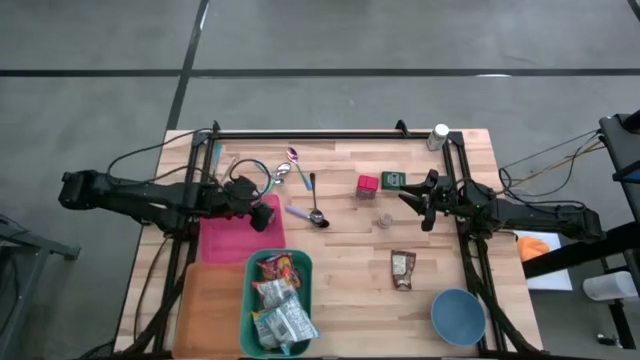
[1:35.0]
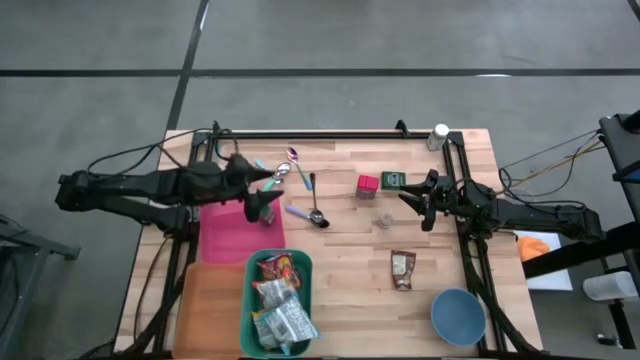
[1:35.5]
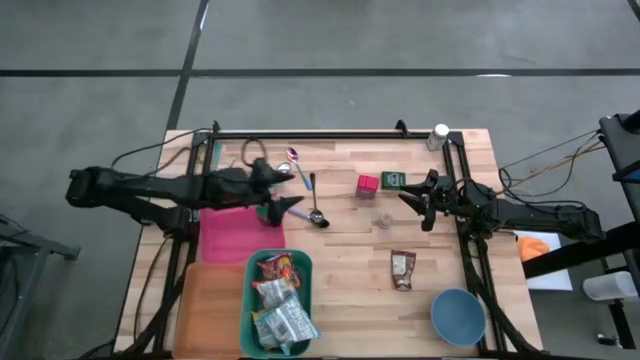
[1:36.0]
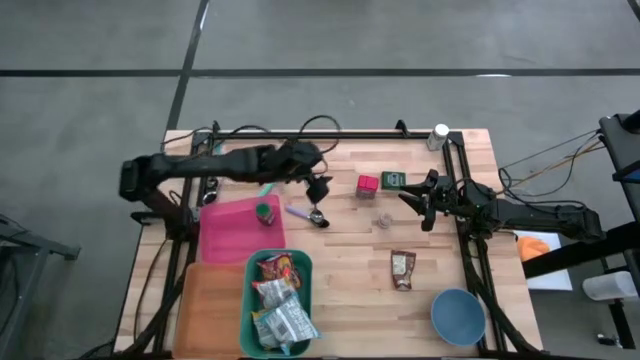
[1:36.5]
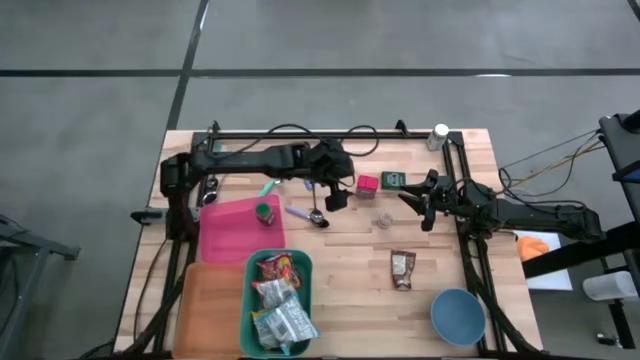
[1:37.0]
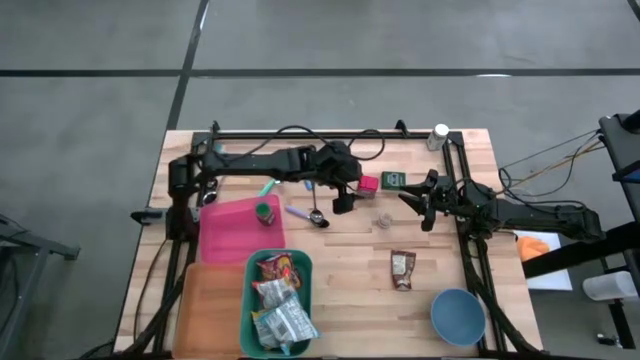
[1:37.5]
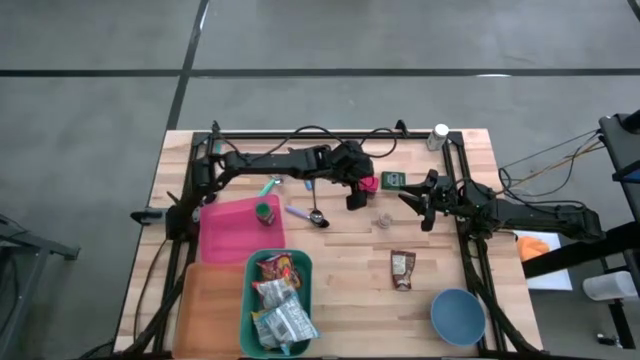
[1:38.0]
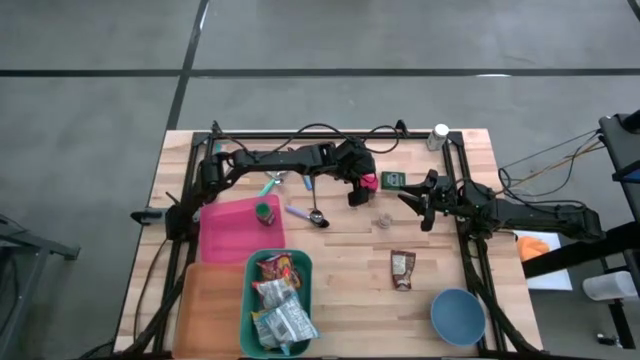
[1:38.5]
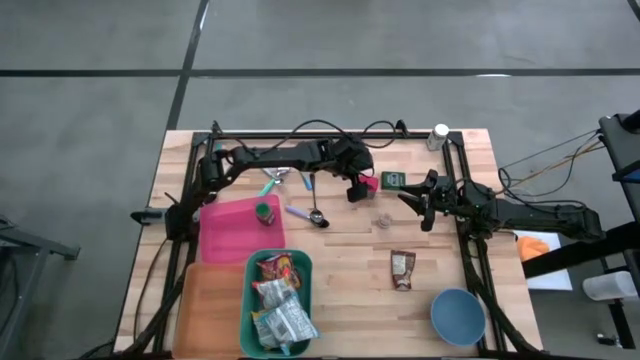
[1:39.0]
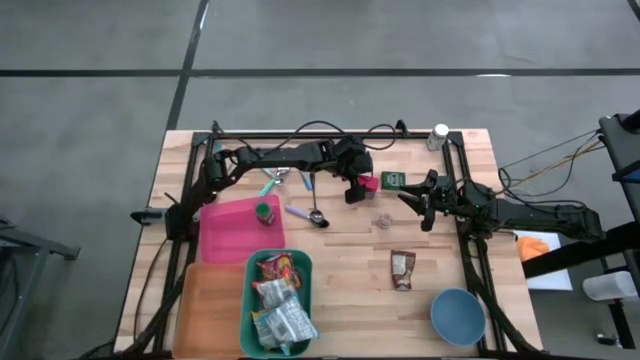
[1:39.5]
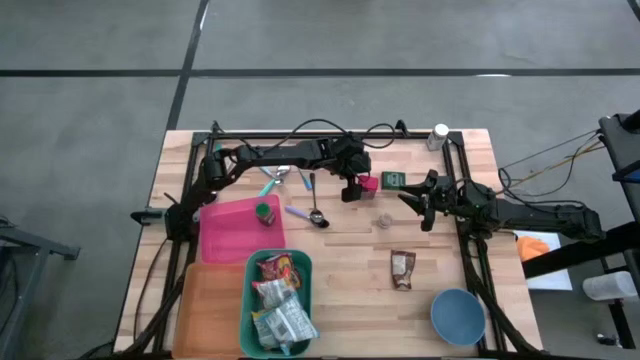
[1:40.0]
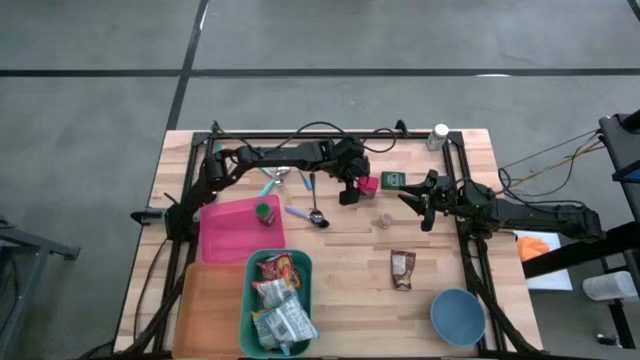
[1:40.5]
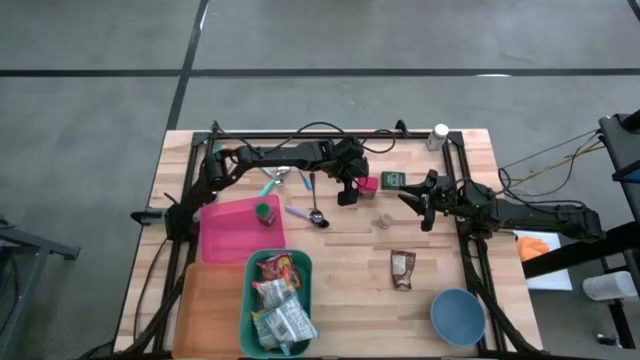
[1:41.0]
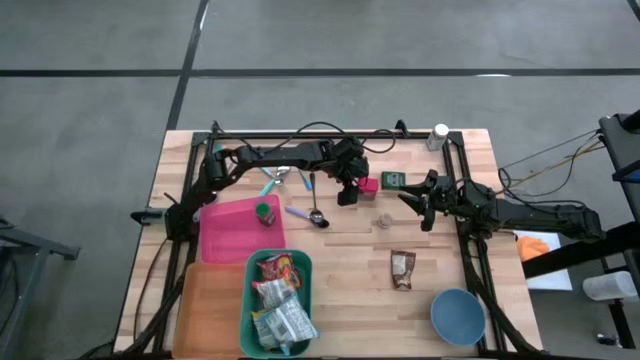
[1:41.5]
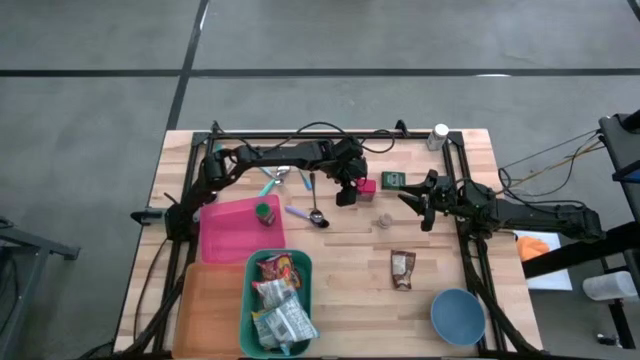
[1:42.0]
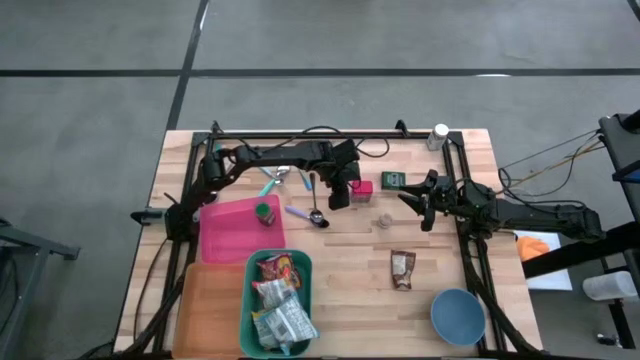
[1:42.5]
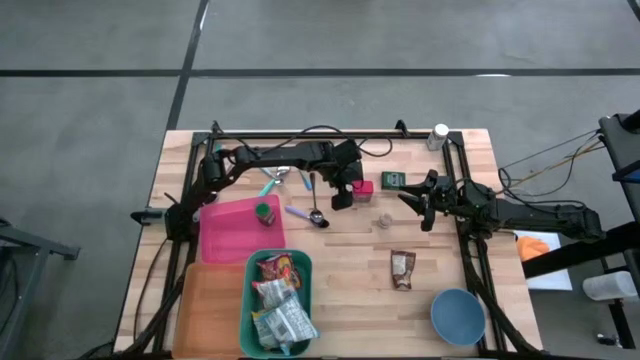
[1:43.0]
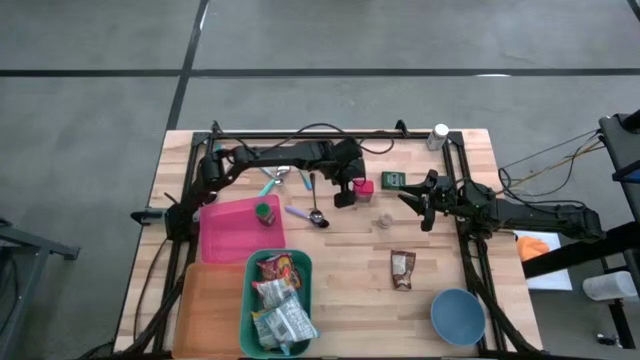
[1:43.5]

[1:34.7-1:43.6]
Put the red seasoning can into the pink bin

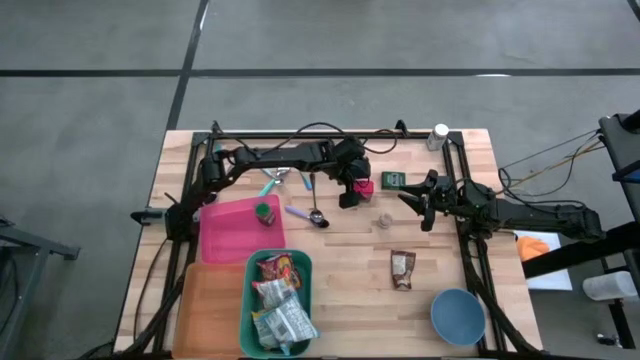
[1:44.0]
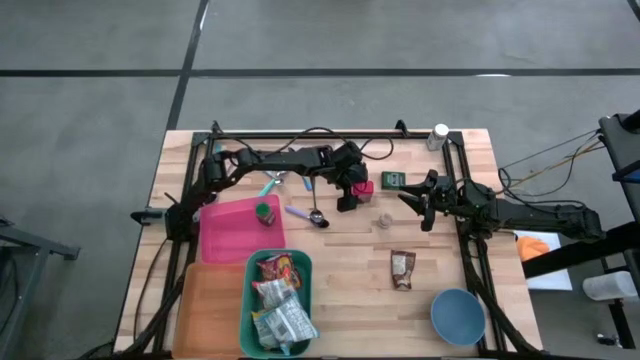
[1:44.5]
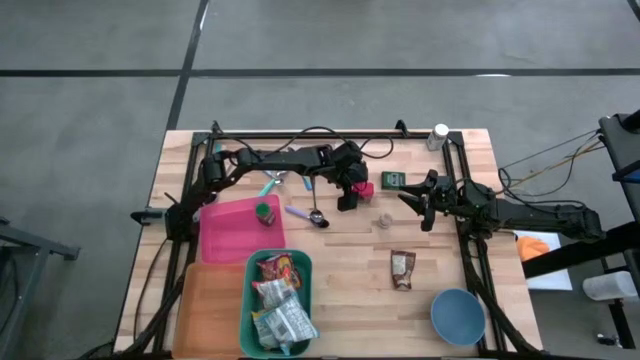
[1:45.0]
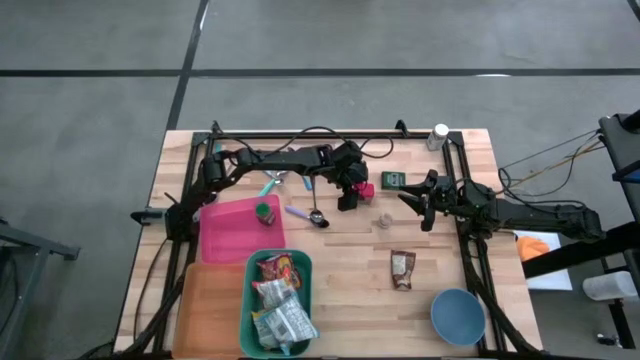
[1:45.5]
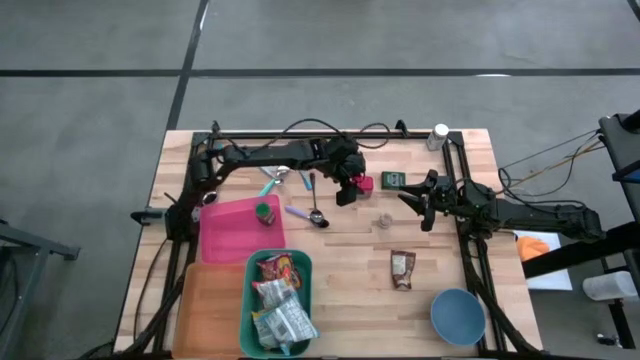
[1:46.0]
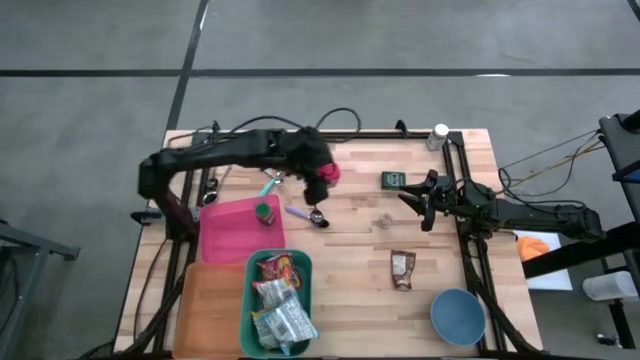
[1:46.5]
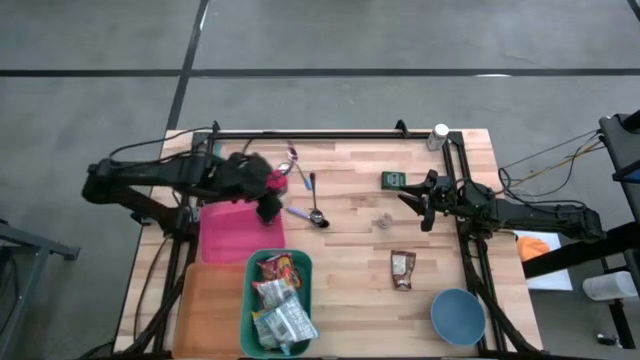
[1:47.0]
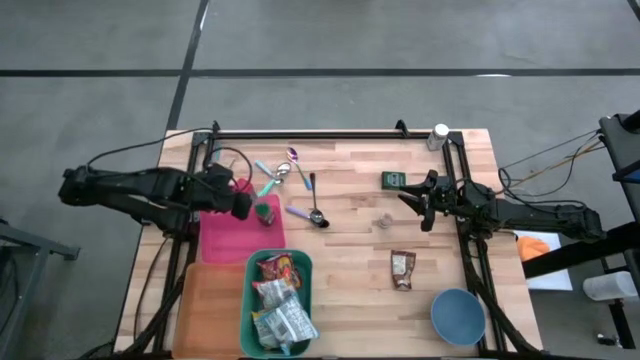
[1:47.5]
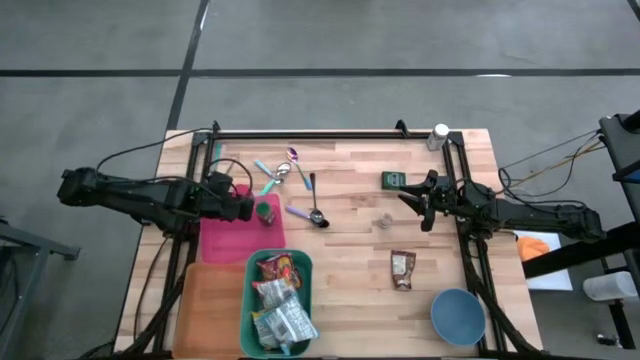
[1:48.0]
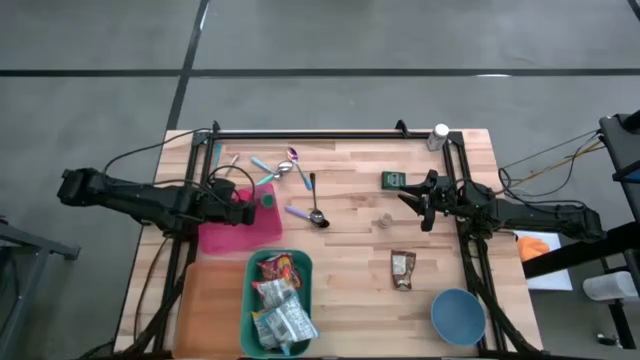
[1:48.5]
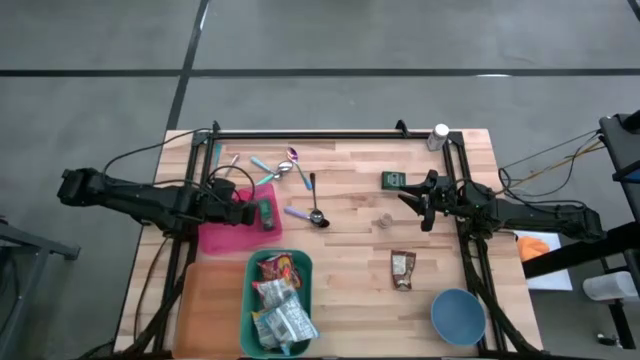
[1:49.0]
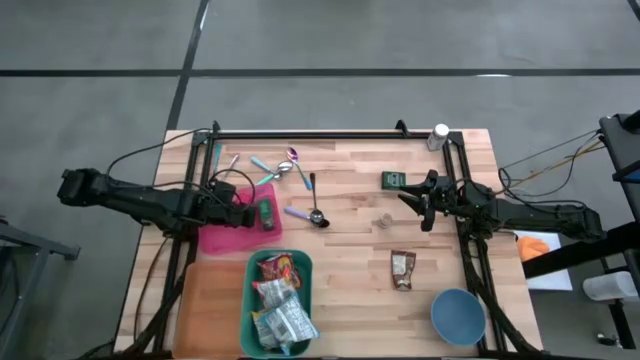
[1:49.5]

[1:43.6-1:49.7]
Put the red seasoning can into the pink bin
